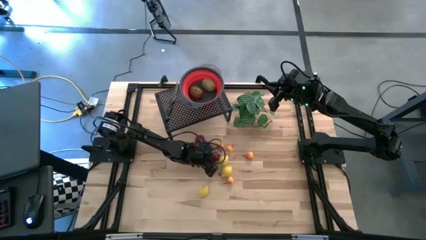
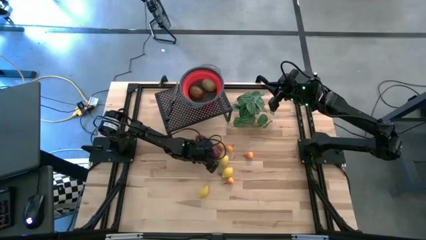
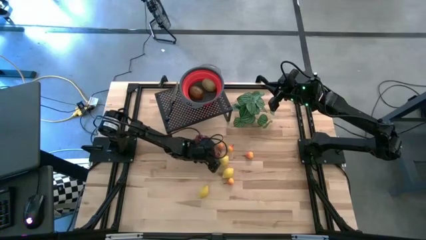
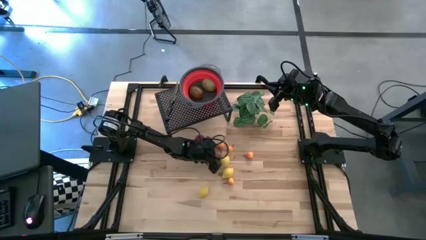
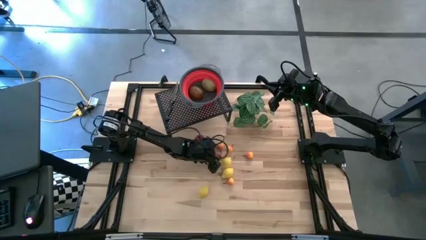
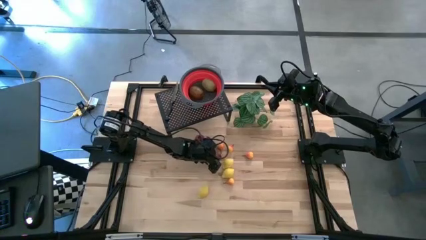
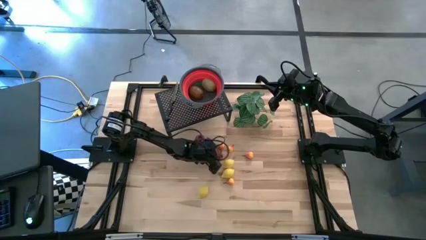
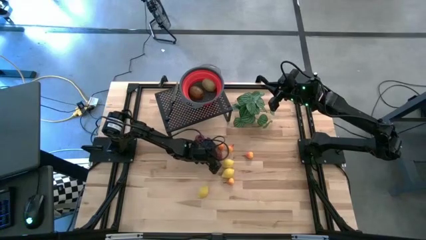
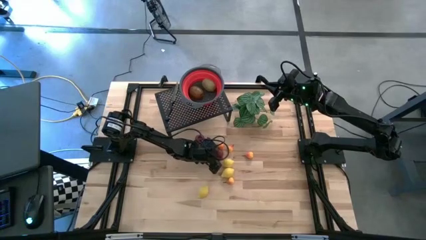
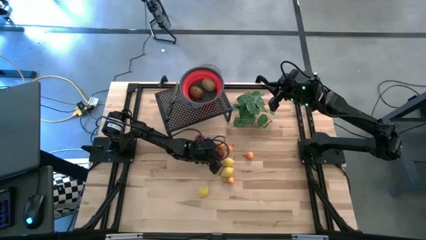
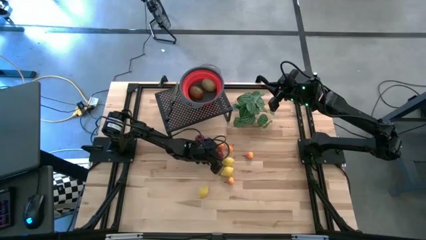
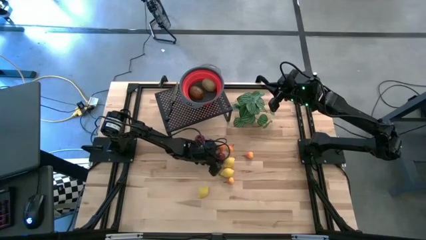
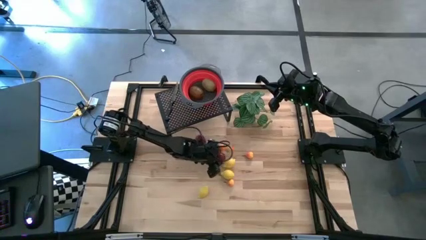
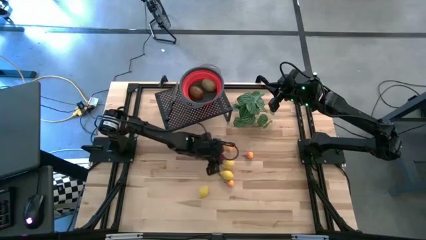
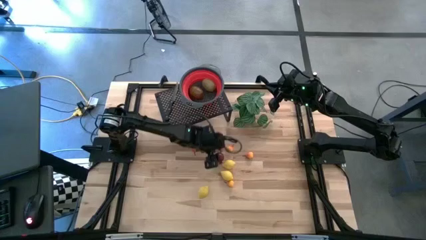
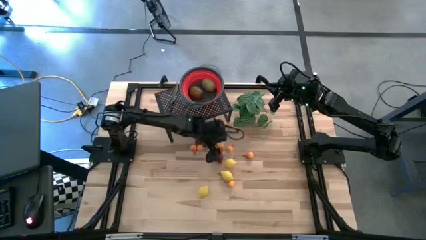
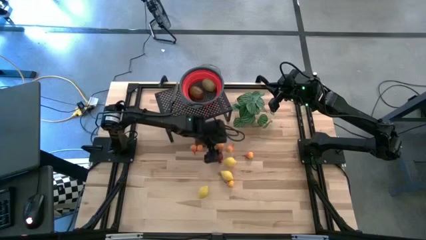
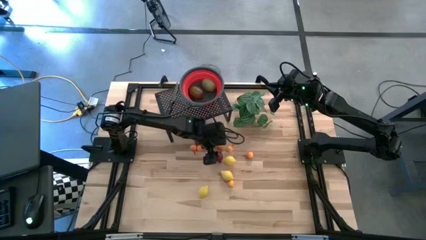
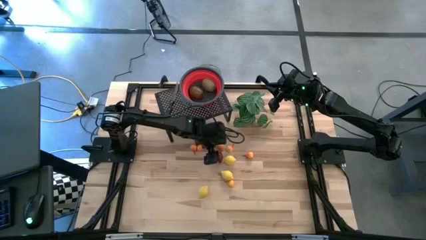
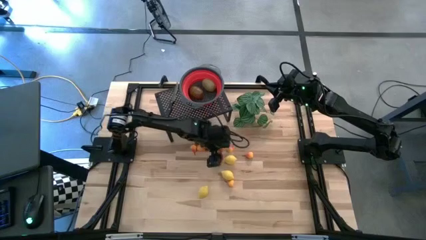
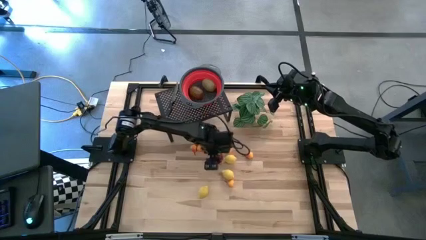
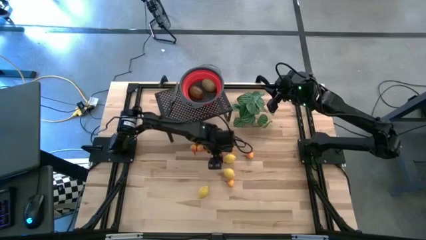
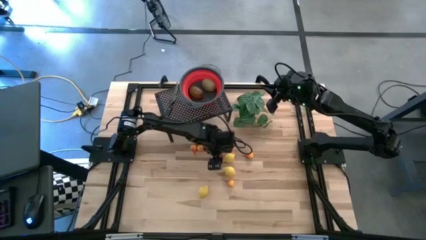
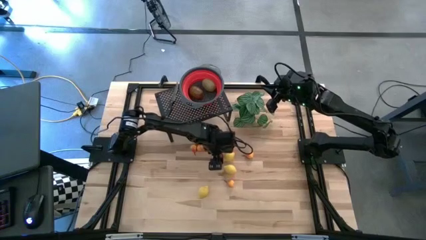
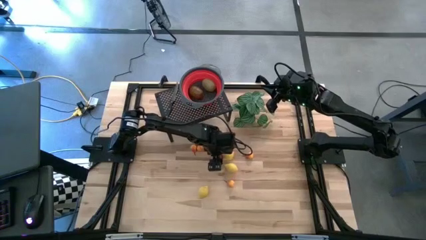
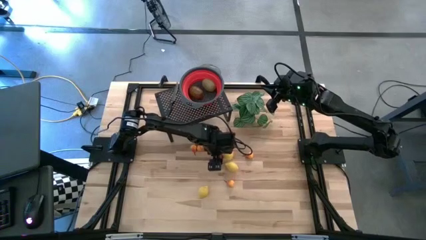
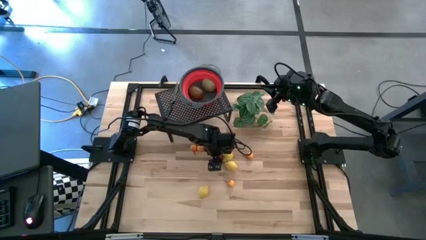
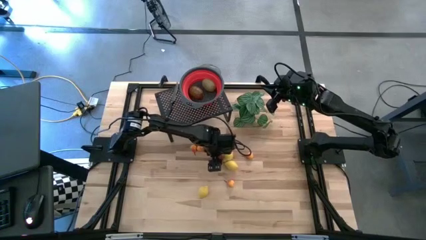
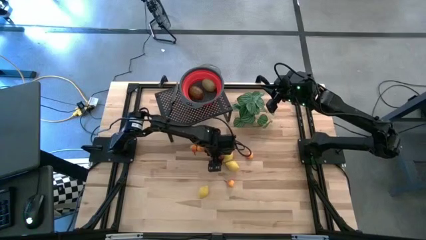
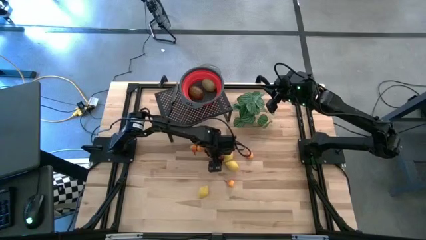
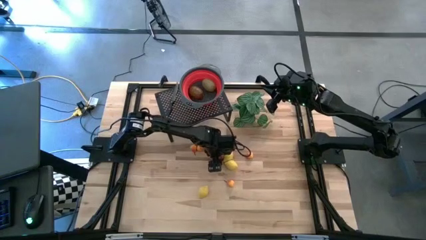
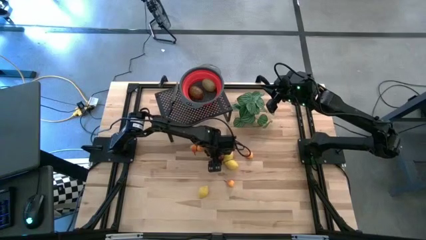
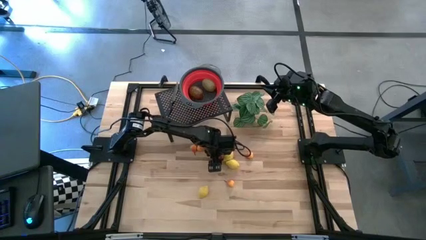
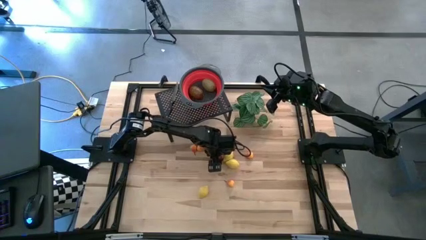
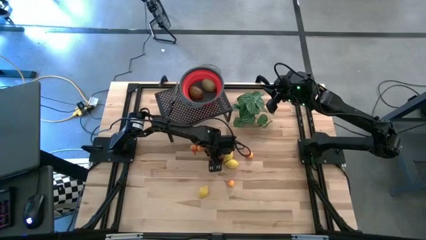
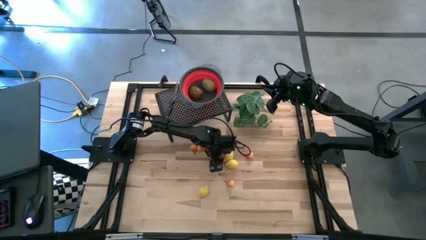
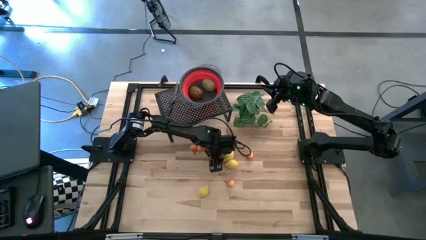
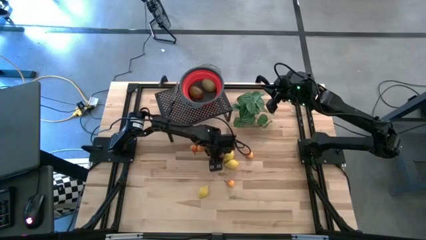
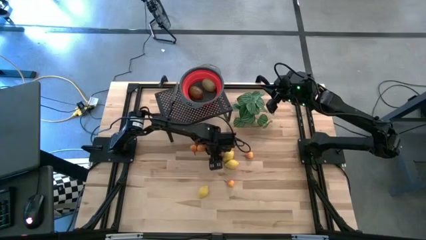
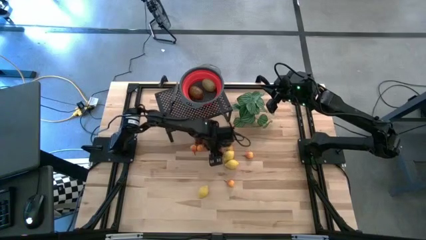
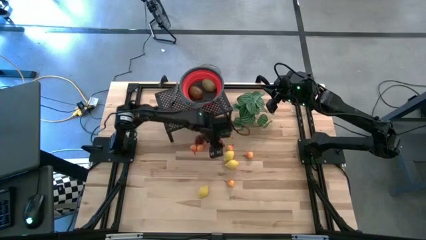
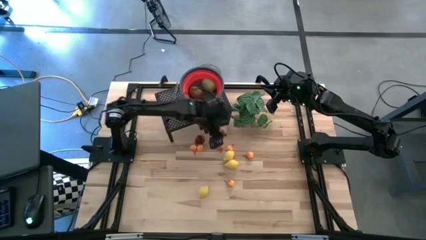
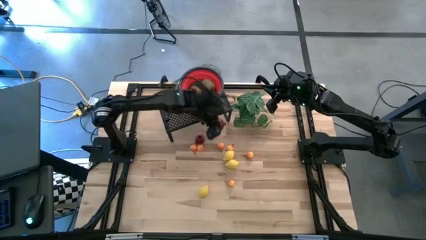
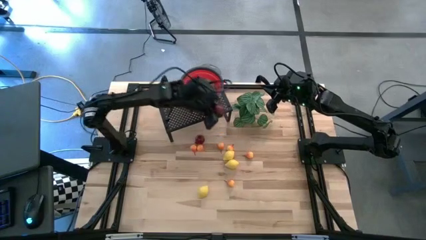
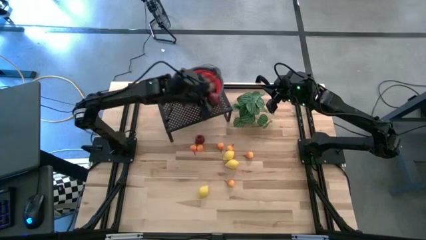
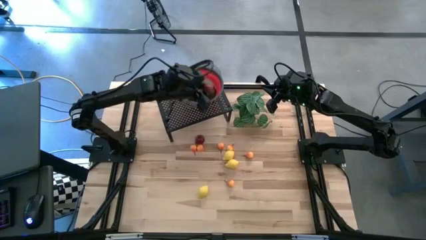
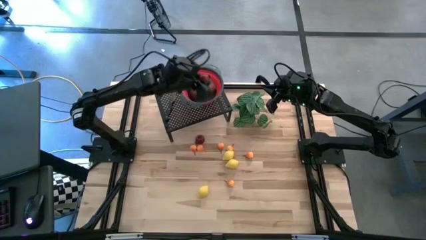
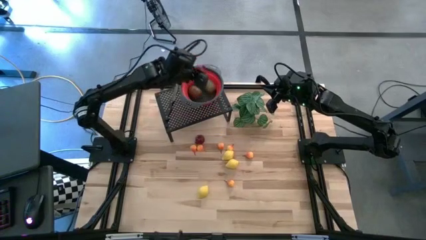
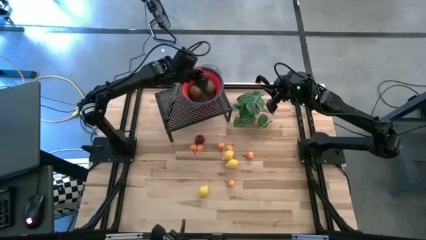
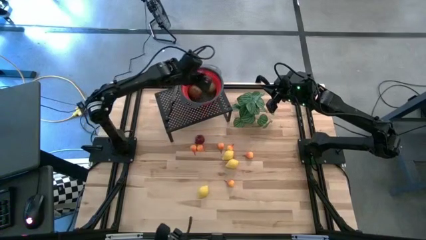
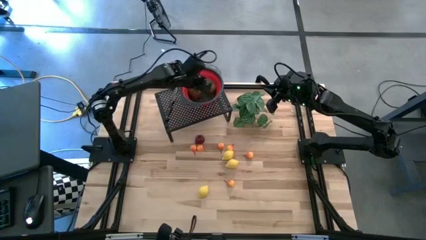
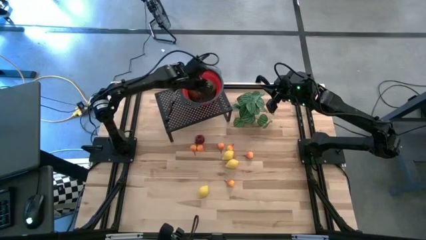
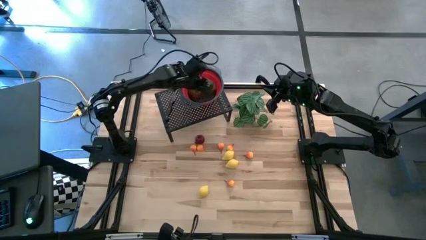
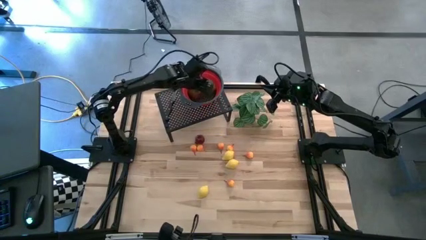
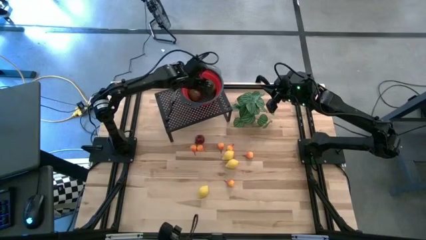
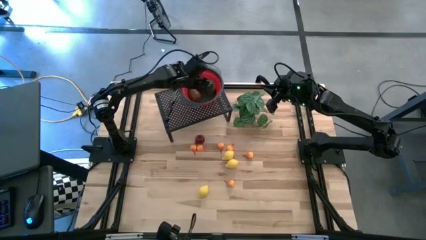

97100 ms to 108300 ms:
Task: Pick & Place Fruit
Put the bottom red pomegranate into the red basket on the shelf
